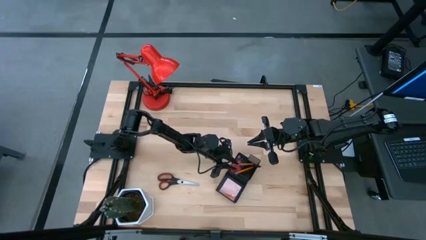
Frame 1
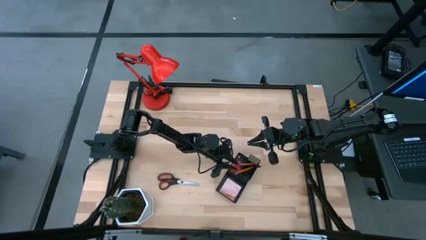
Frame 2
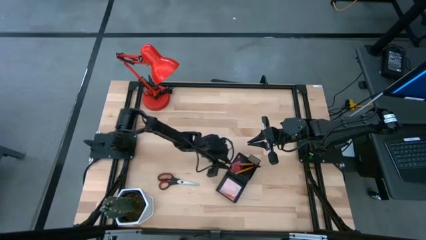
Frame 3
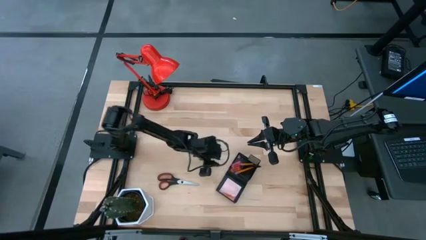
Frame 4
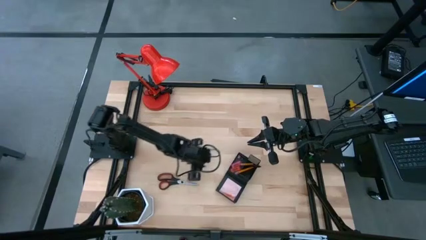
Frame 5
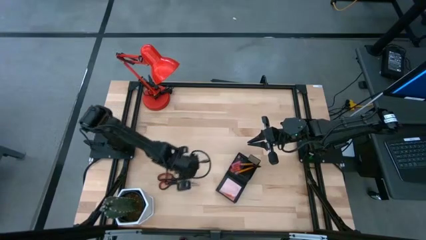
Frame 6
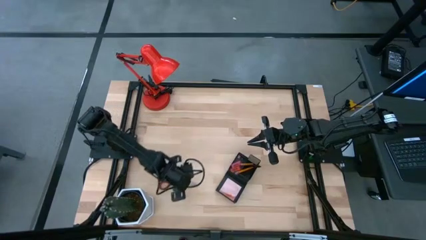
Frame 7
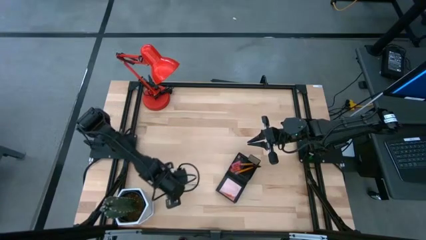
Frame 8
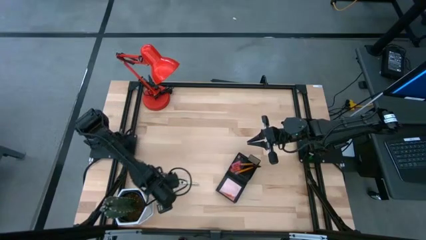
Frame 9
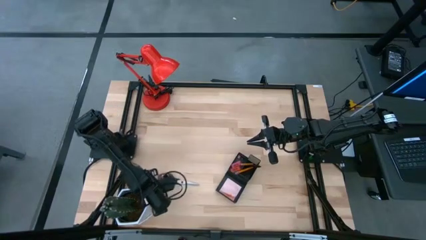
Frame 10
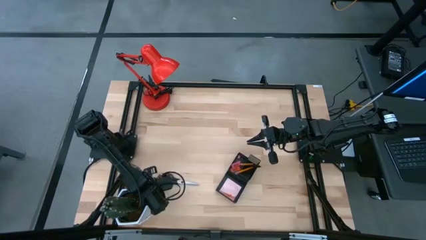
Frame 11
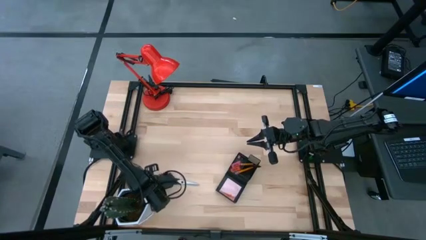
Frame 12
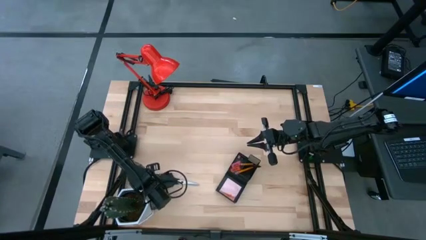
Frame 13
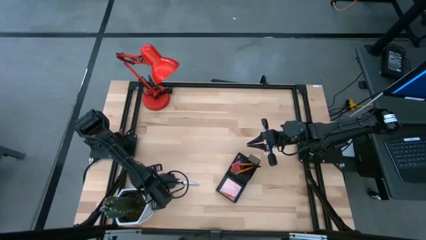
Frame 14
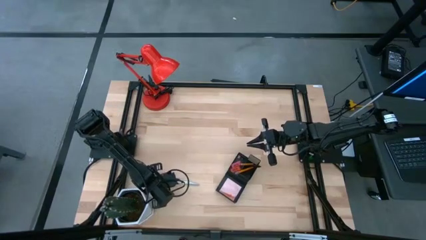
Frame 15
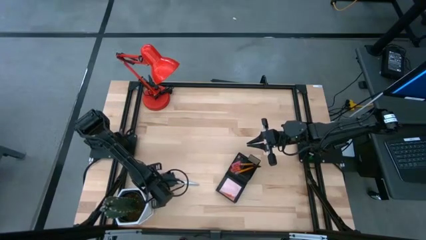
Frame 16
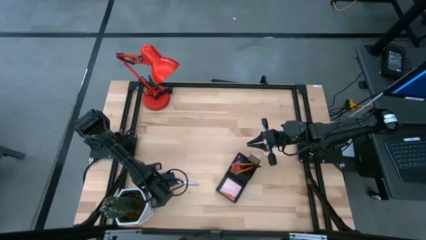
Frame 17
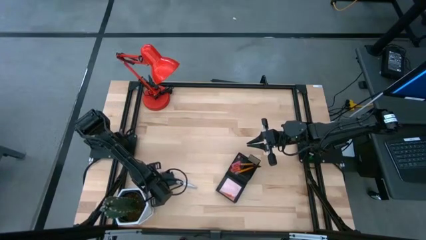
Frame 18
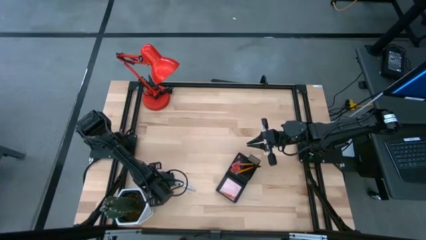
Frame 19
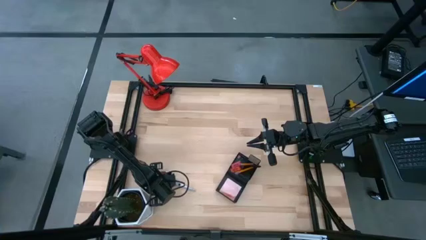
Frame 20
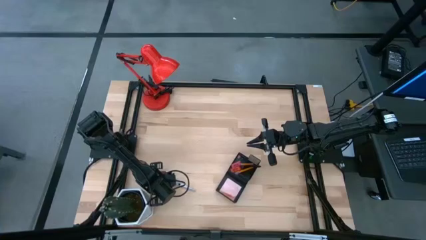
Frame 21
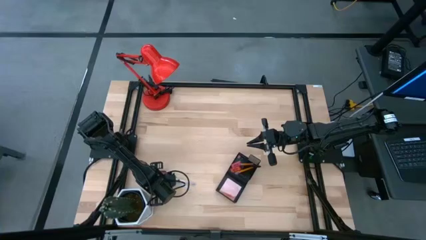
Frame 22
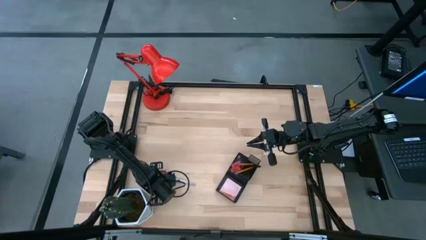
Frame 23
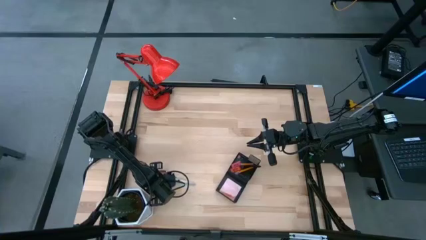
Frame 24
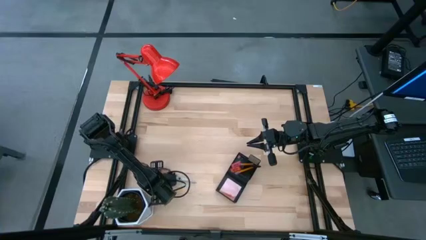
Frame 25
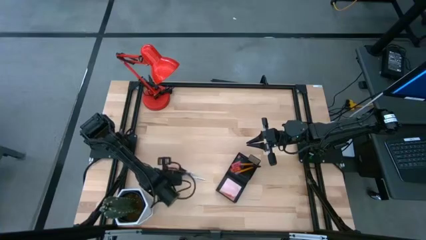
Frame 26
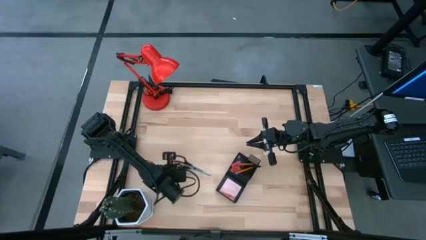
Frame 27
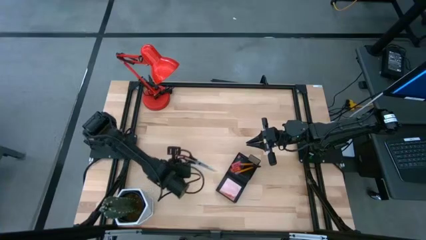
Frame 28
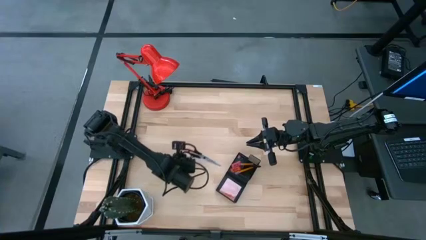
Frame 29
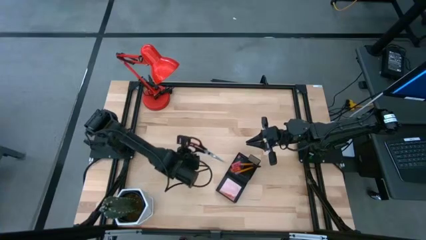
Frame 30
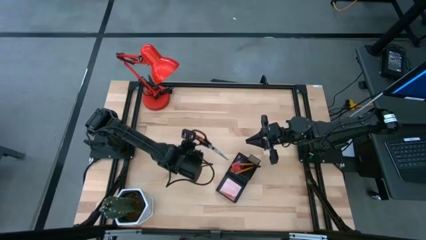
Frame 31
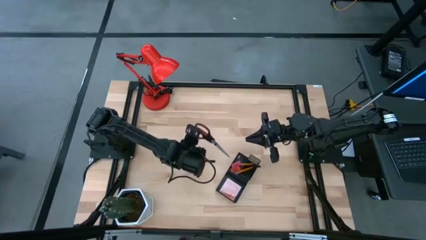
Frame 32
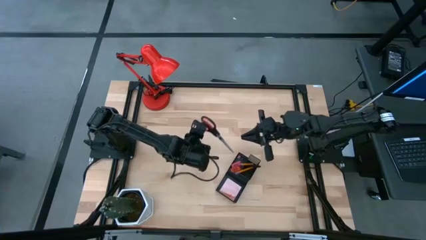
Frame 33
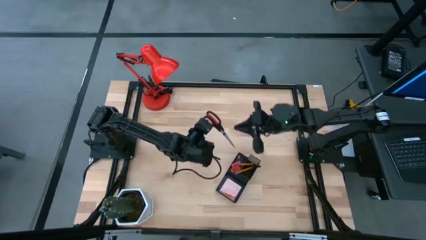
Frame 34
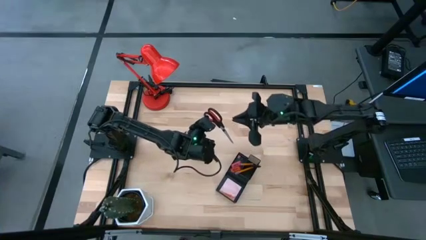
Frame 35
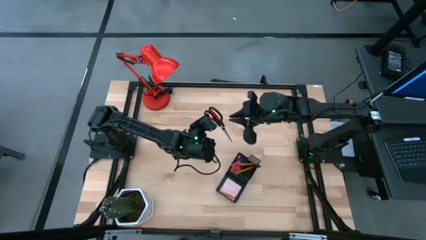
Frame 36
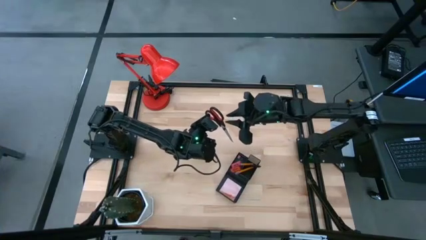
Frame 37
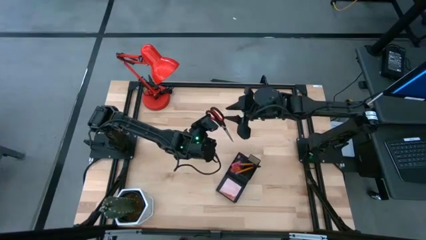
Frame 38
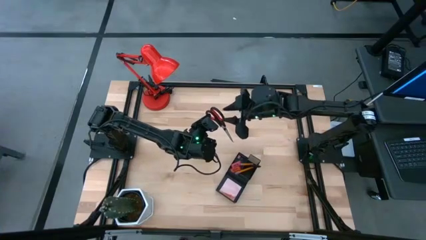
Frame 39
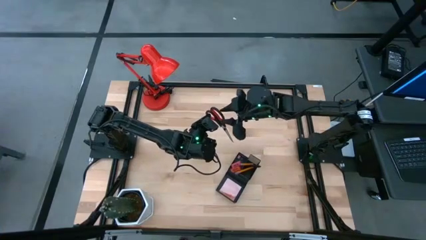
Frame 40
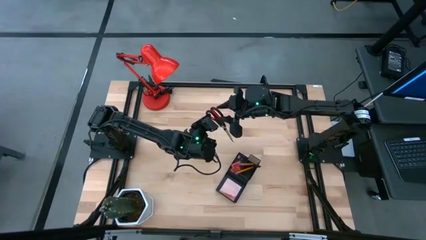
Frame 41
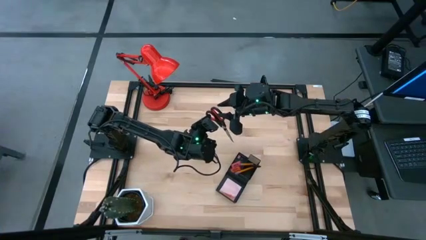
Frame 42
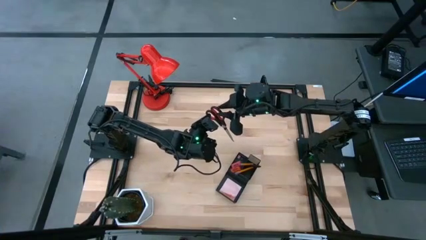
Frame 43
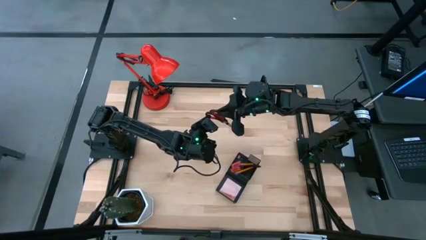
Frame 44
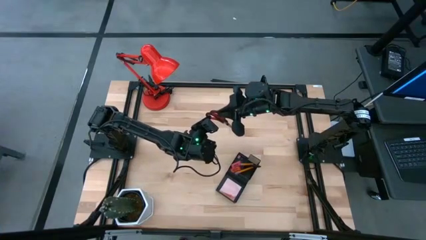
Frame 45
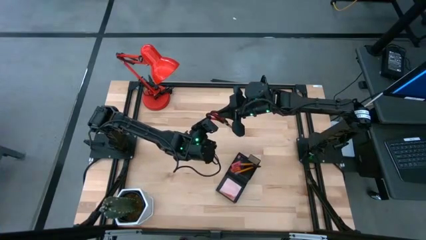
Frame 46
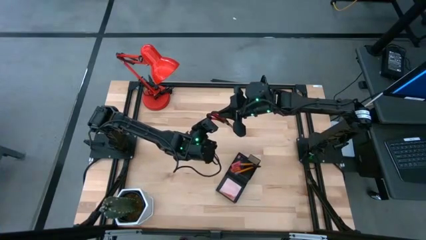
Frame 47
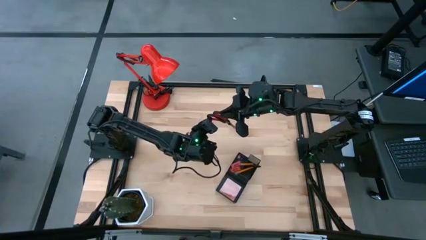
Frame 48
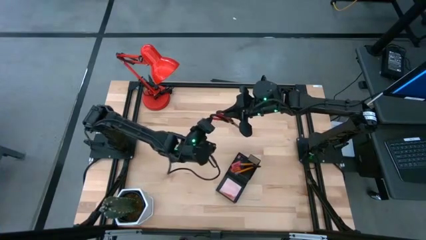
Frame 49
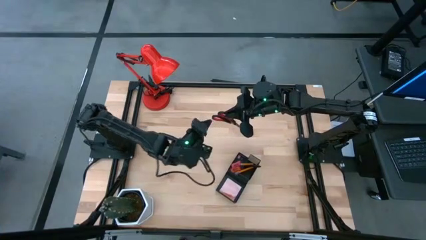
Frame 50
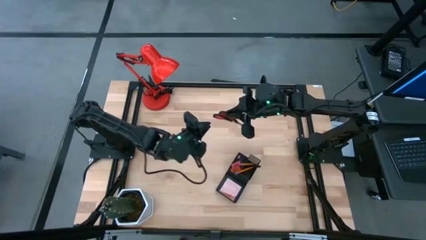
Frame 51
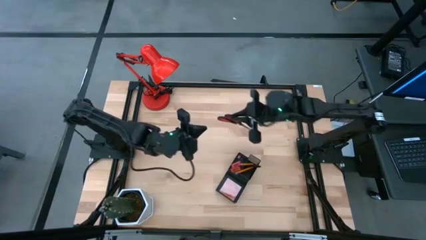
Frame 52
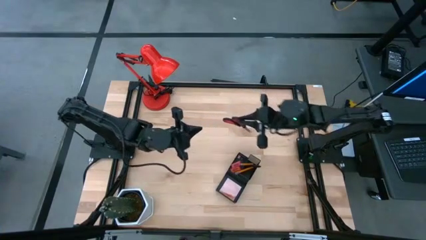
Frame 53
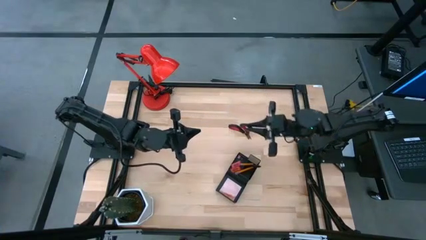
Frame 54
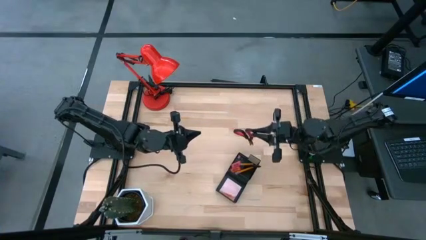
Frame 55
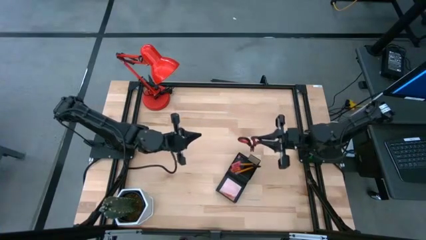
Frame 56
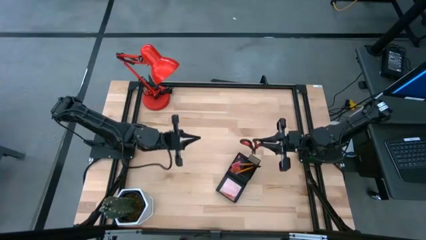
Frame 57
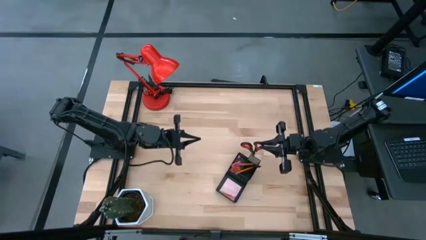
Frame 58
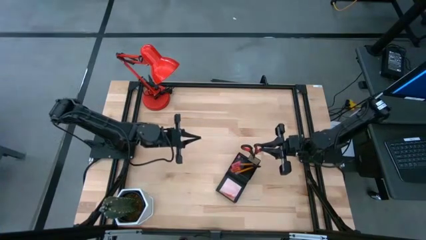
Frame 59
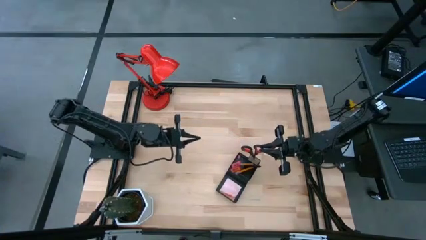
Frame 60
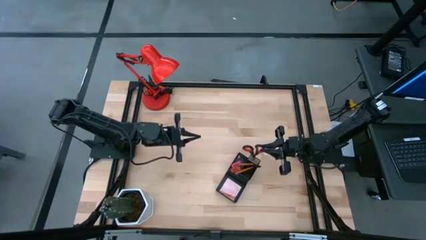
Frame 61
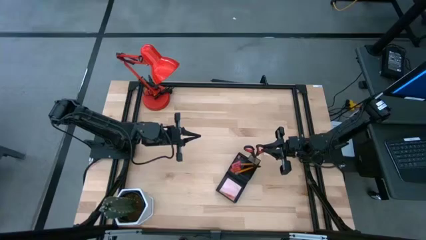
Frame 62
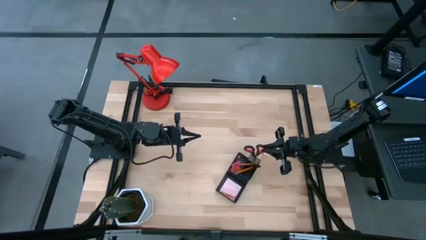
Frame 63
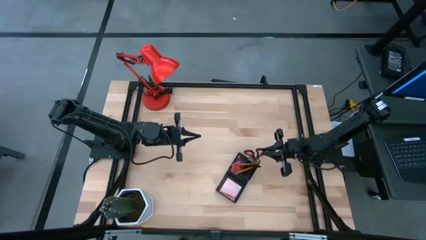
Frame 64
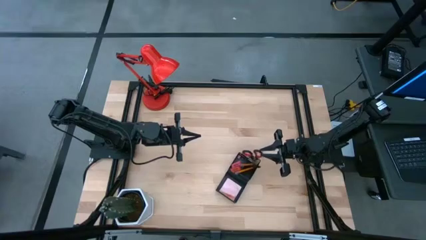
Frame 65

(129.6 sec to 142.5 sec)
Task: Pick and place office supplies into organizer
Put the scissors into the desk organizer
